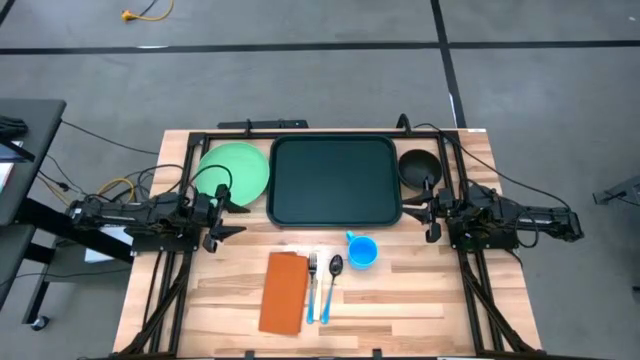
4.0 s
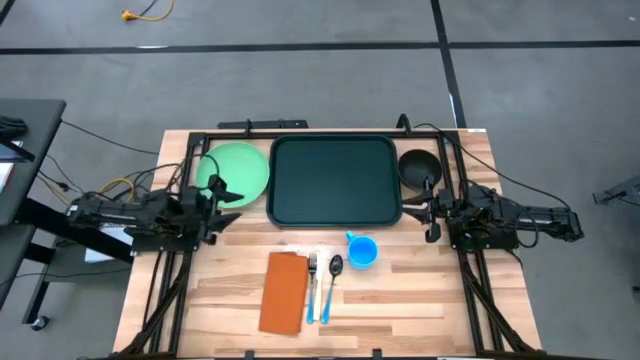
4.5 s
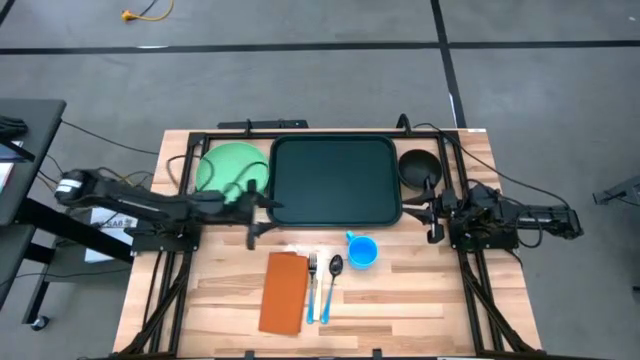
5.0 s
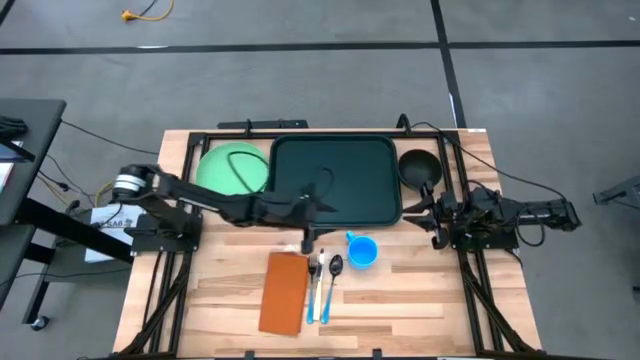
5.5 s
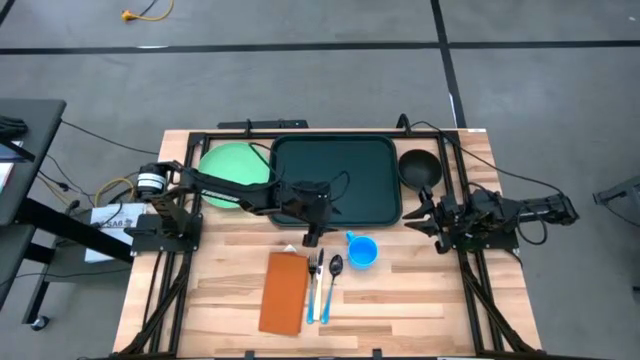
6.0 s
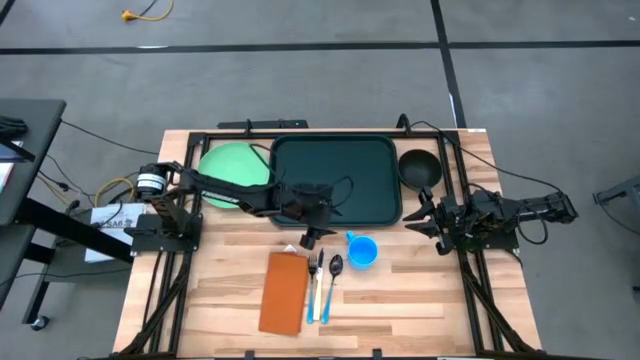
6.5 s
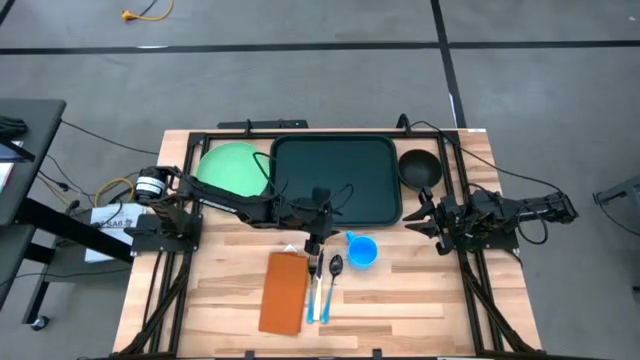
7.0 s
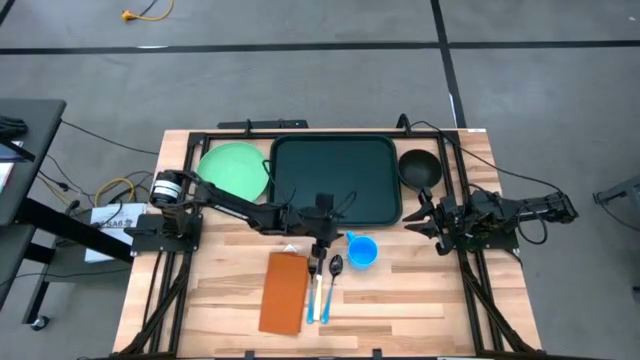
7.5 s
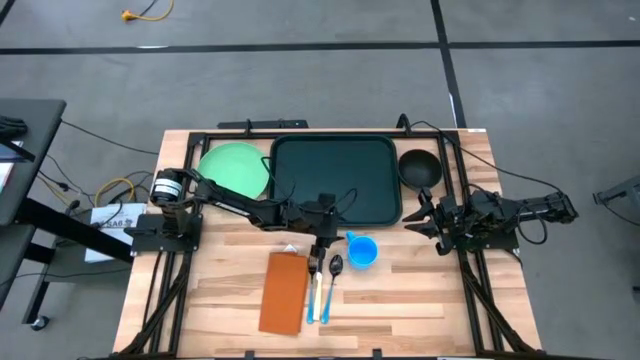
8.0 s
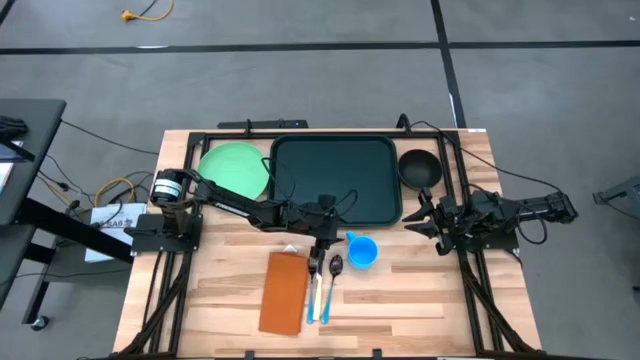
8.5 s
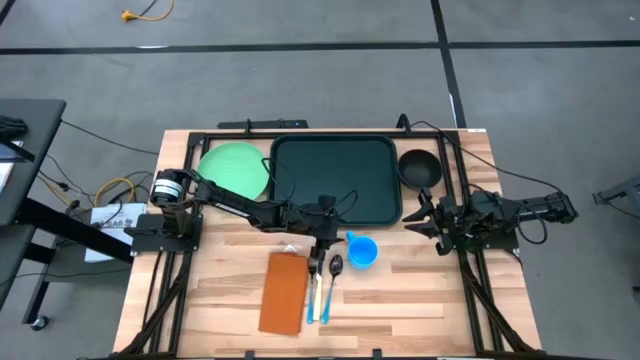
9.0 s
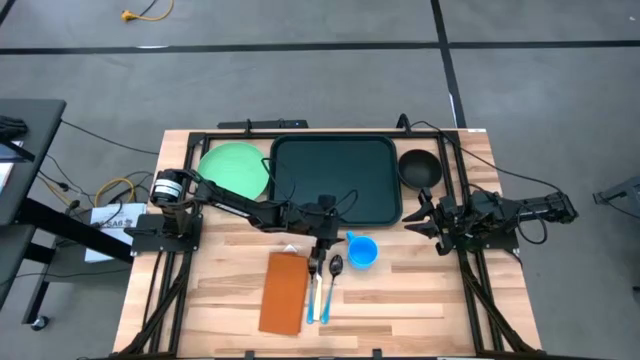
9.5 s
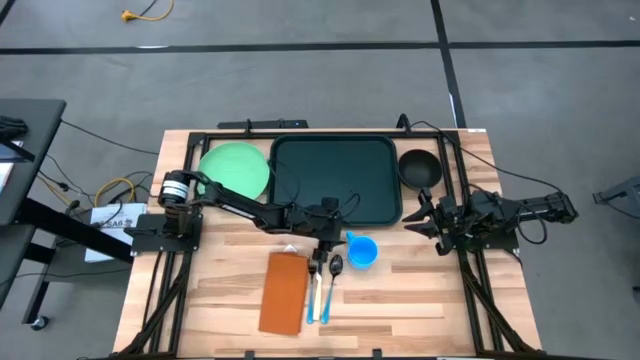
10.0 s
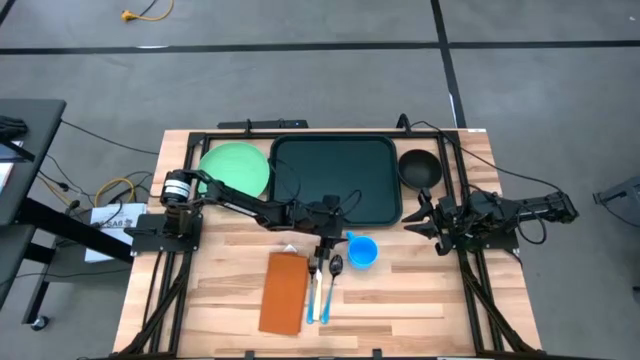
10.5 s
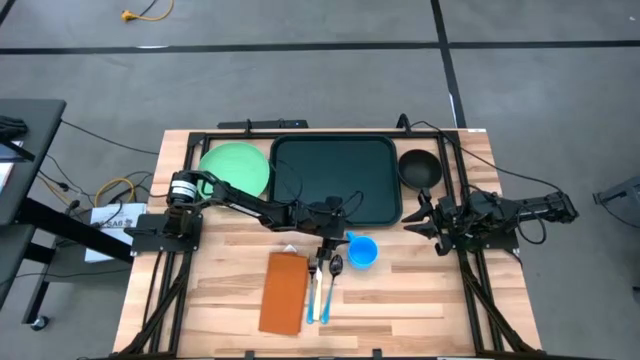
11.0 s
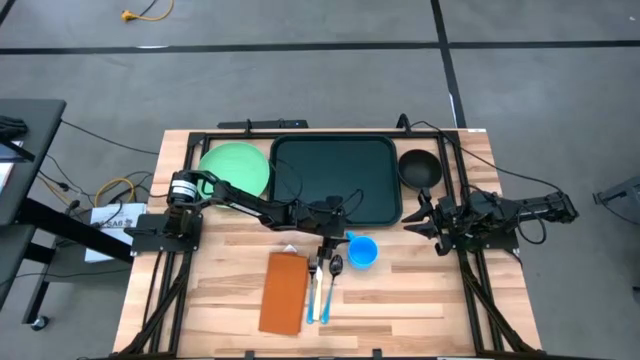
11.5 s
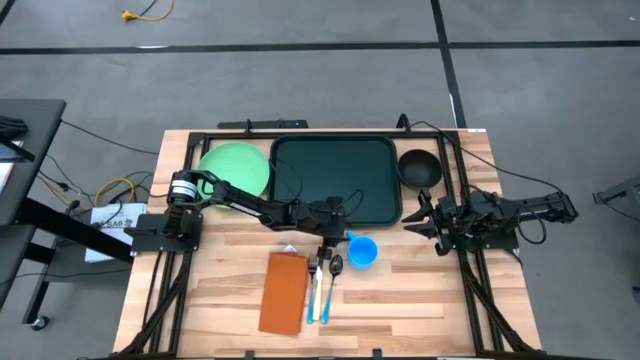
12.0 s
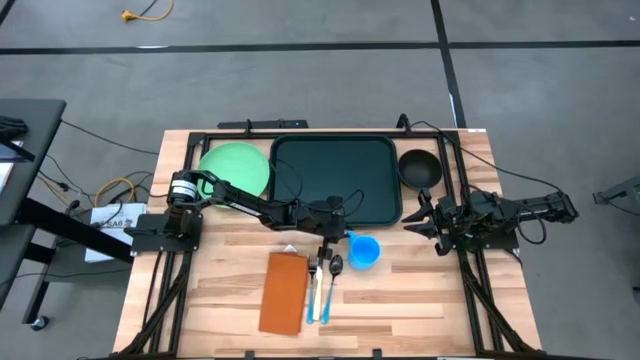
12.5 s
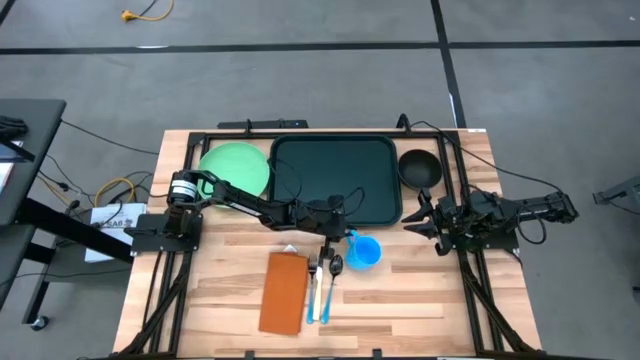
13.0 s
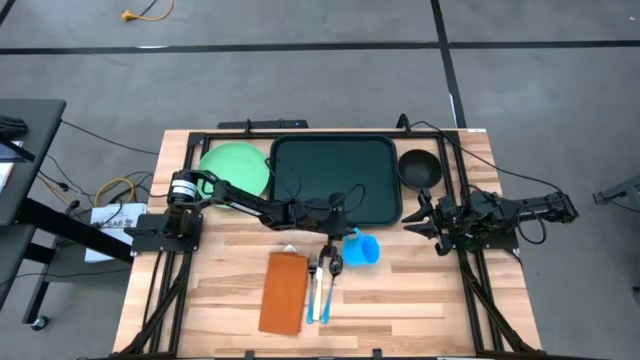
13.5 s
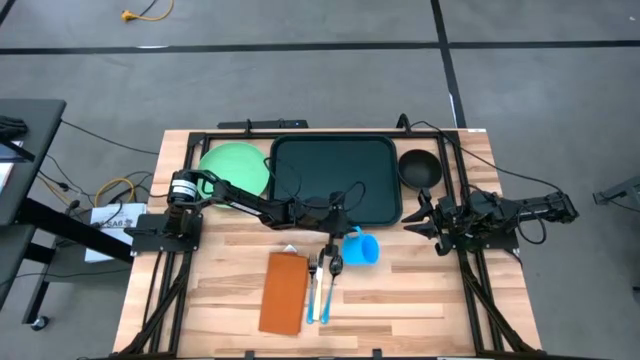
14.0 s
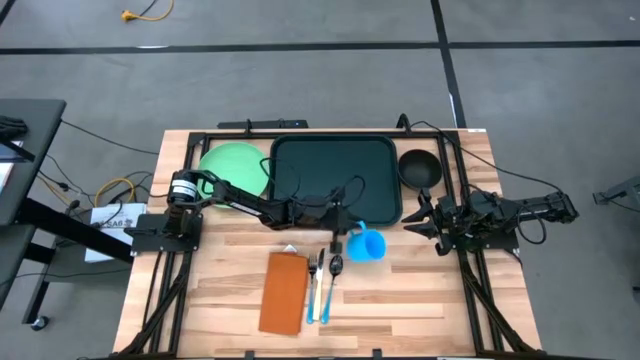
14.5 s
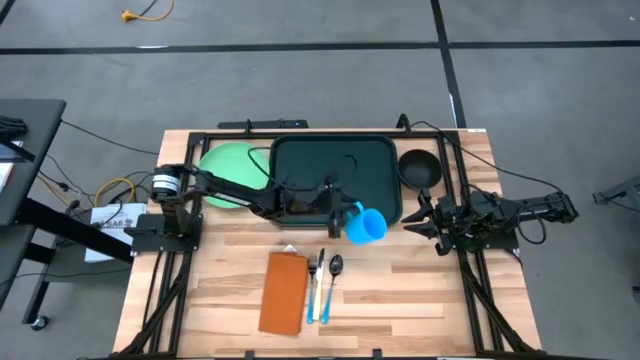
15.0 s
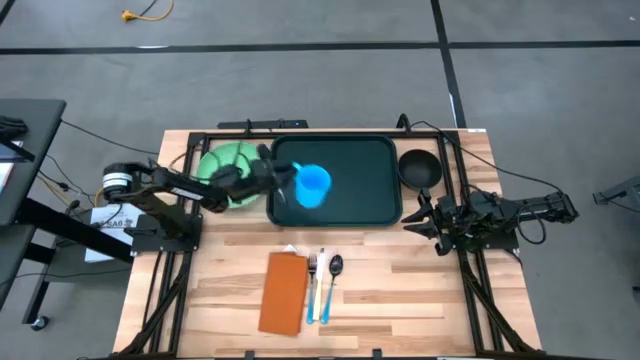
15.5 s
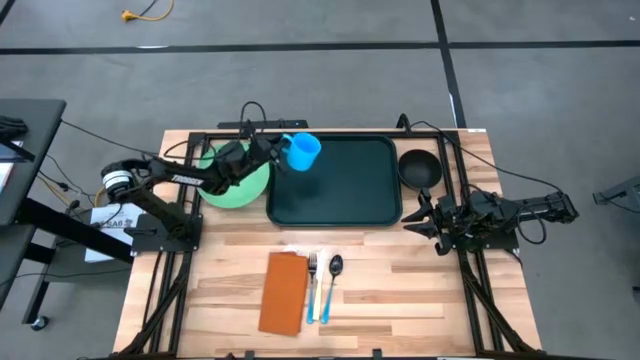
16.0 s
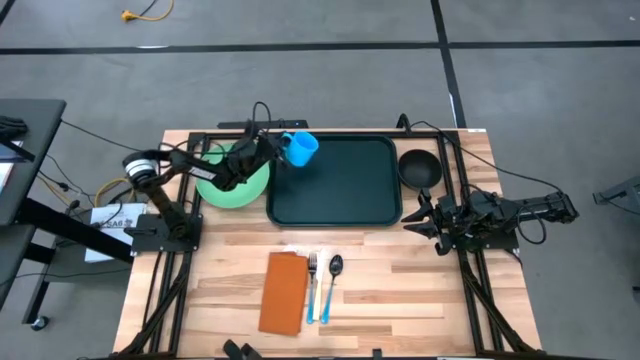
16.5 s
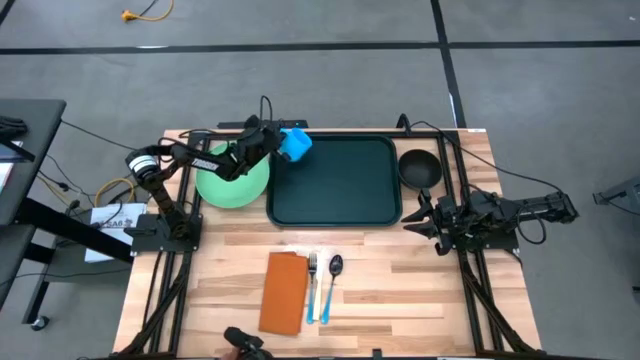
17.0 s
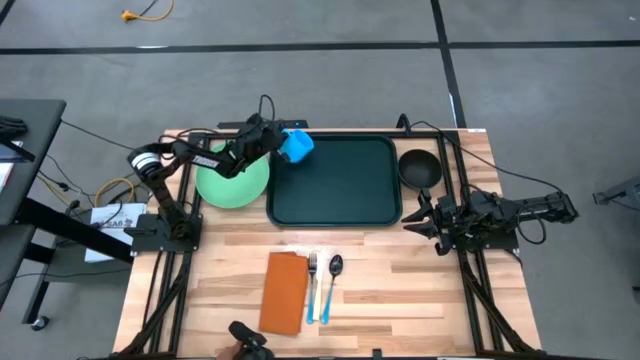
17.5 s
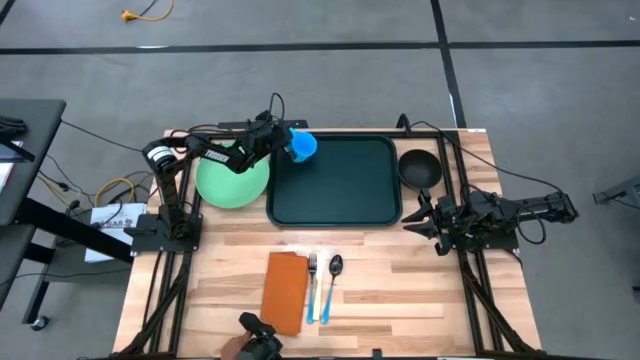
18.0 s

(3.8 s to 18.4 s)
Task: Set up tray
Put the blue mug on the black serving tray

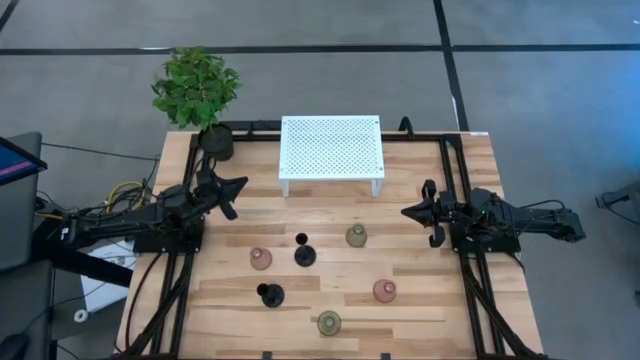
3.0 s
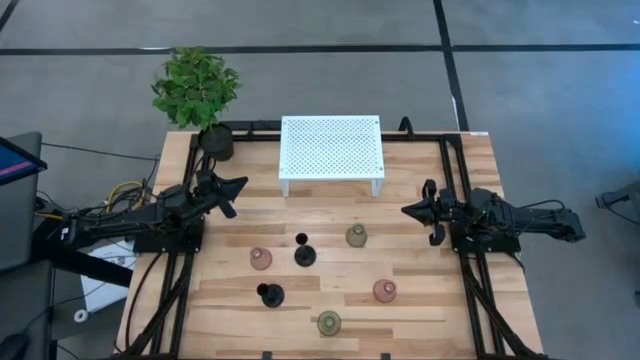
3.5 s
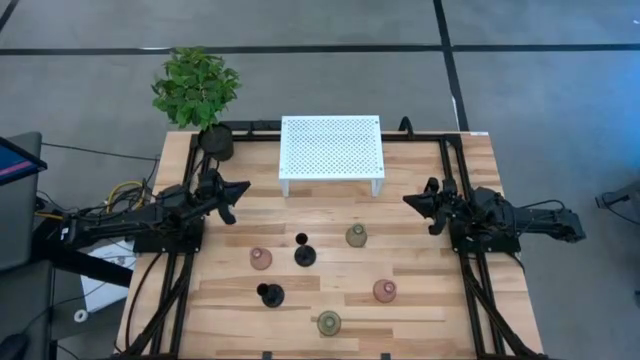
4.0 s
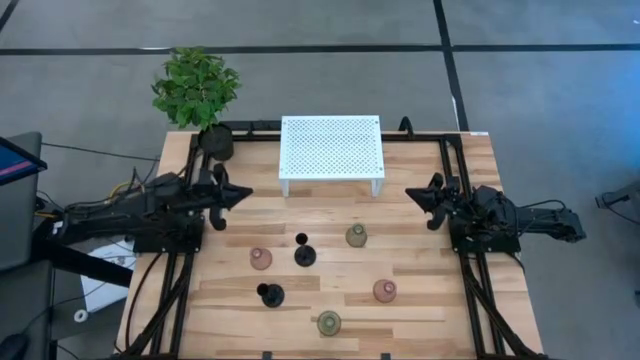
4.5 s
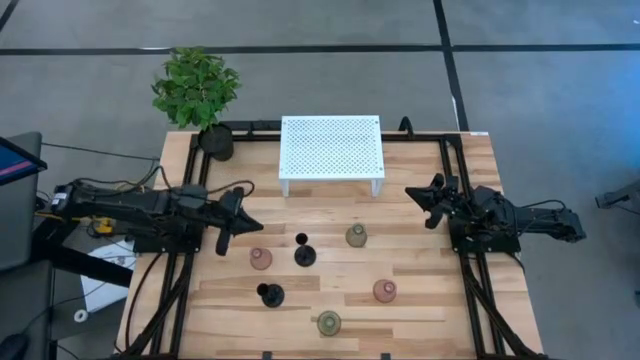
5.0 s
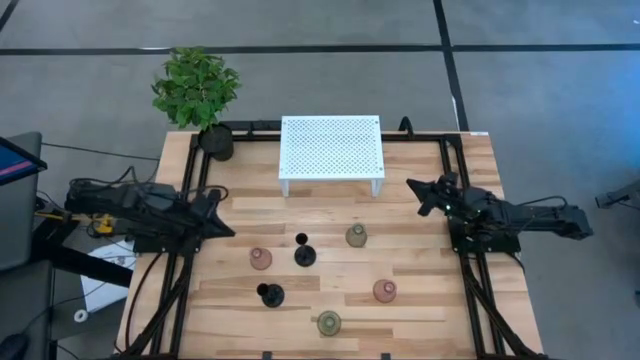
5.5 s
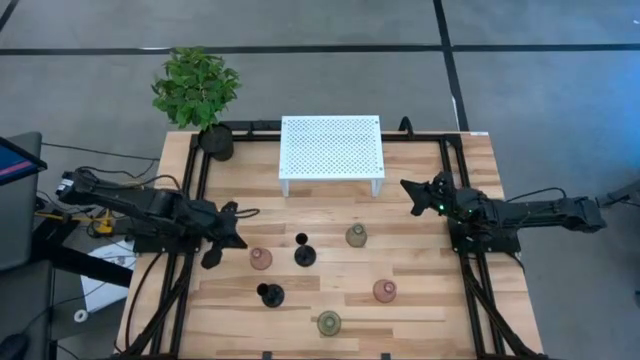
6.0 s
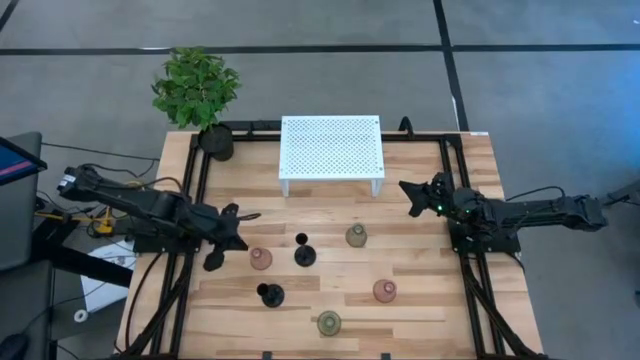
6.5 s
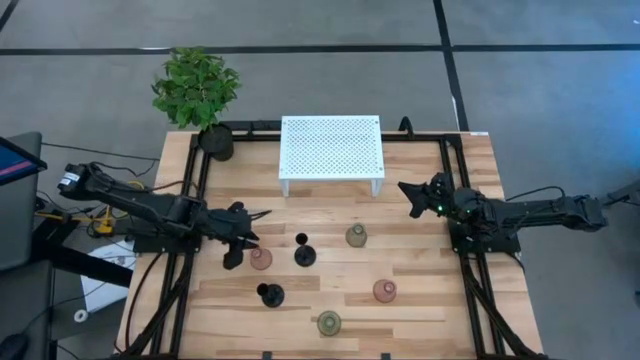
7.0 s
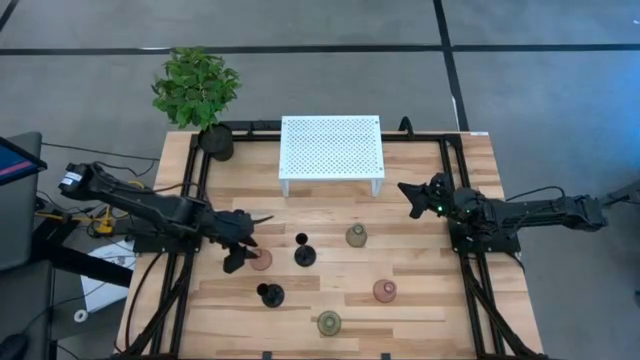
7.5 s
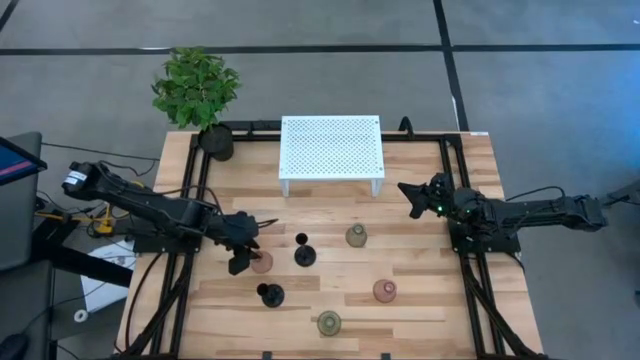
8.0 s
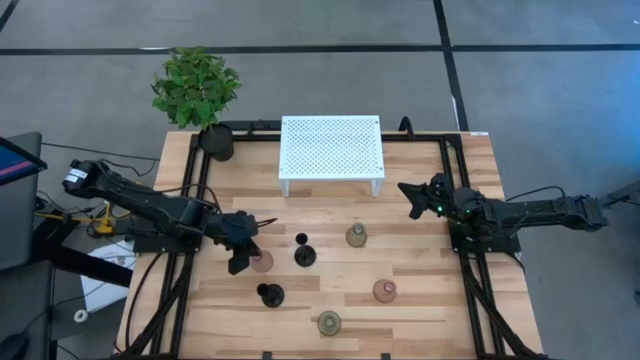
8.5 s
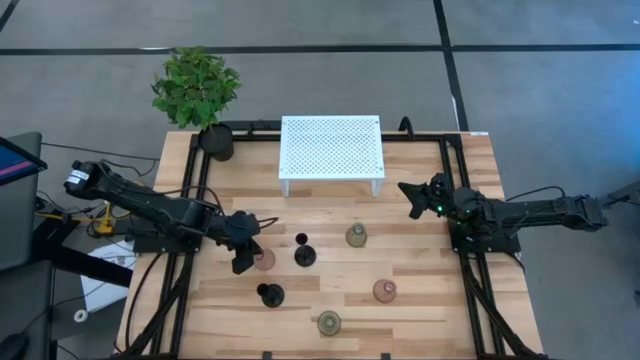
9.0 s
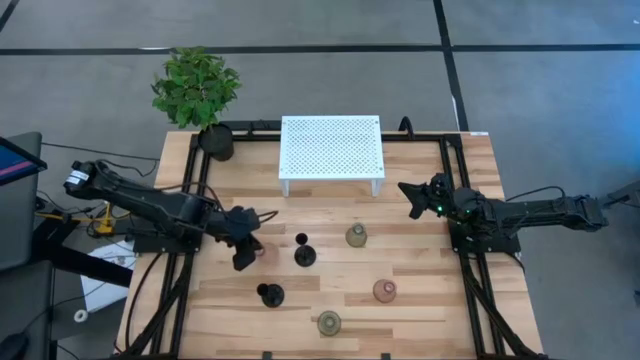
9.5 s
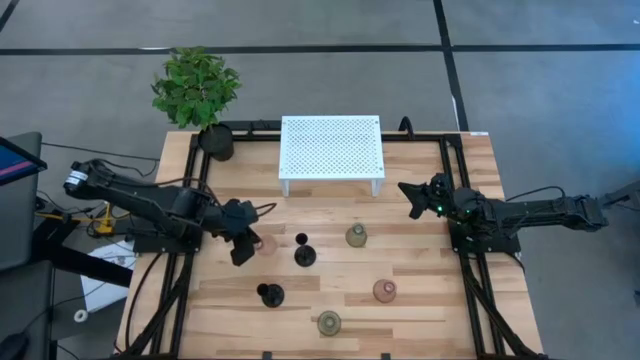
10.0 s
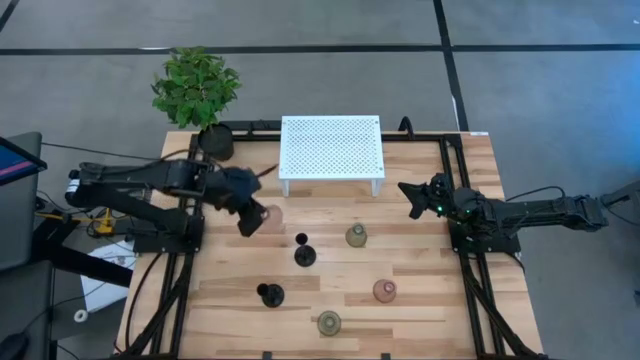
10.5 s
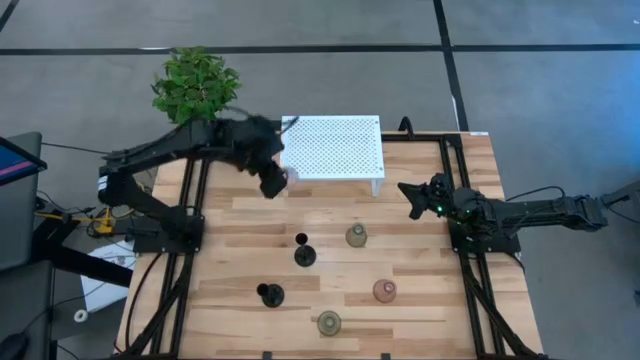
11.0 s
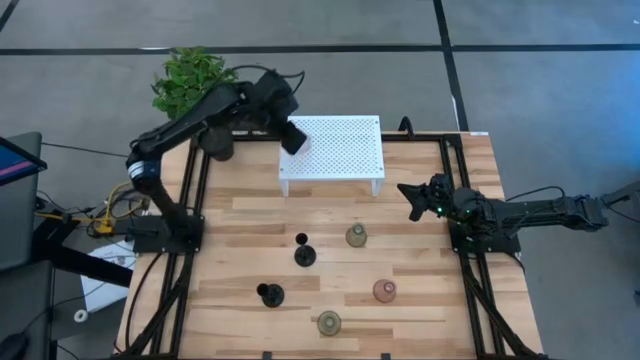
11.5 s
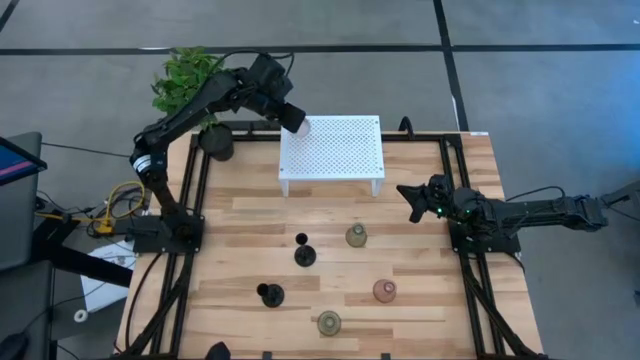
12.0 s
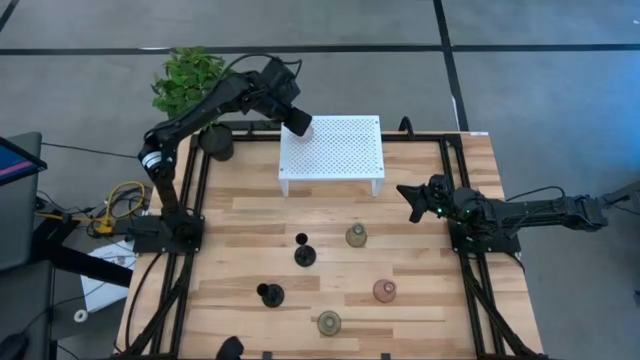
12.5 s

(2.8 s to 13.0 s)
Task: Pick & Place candle stick holders
Put the left pink candle holder on the shelf
